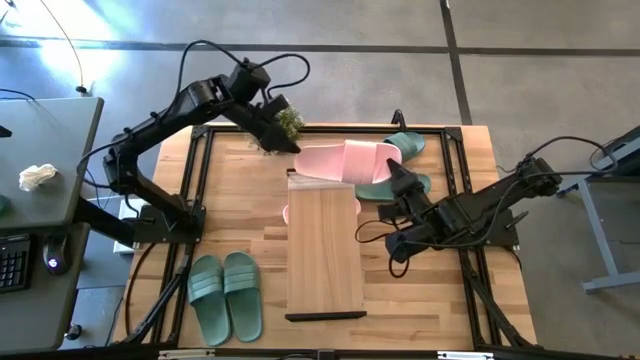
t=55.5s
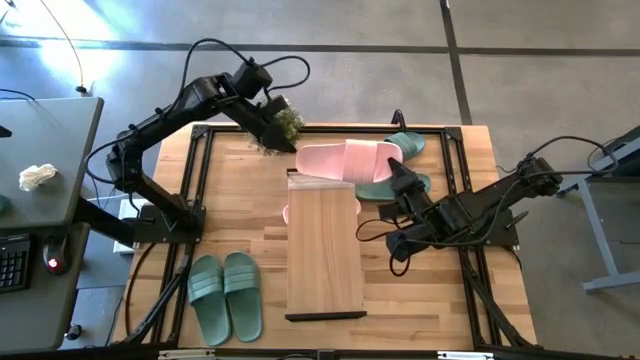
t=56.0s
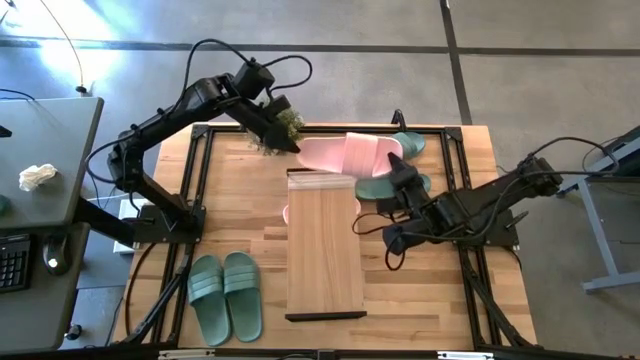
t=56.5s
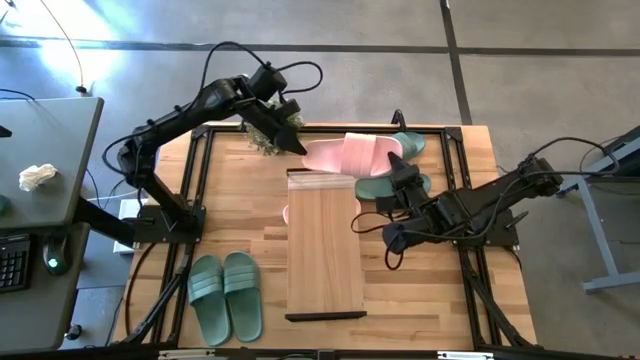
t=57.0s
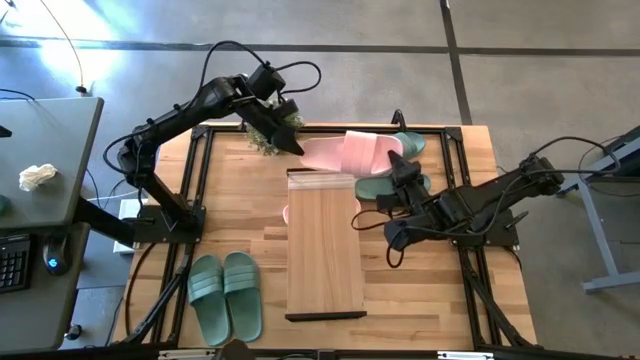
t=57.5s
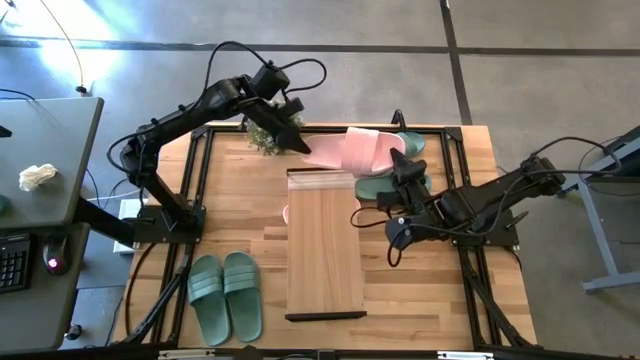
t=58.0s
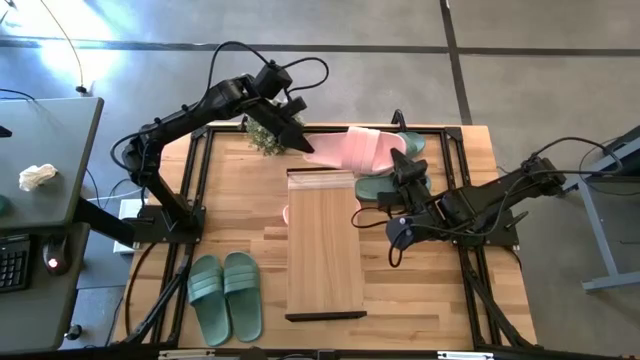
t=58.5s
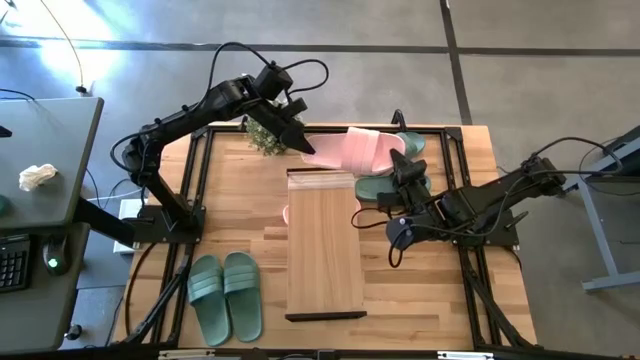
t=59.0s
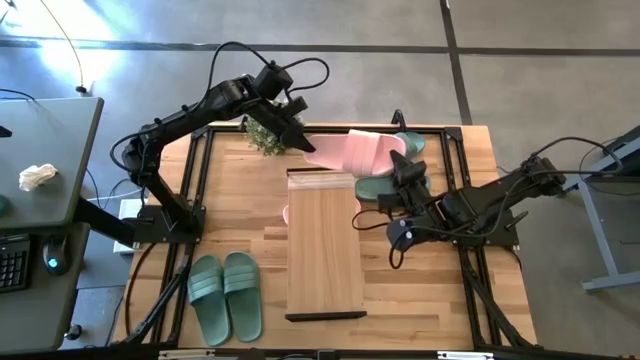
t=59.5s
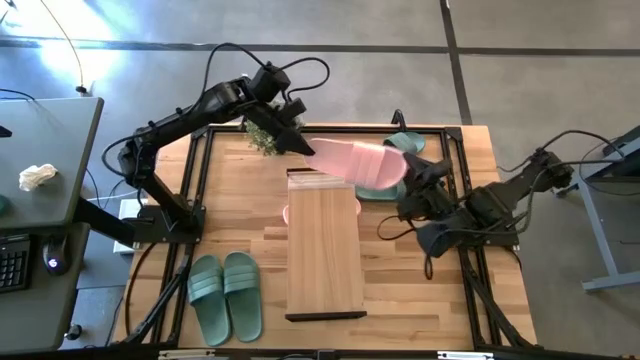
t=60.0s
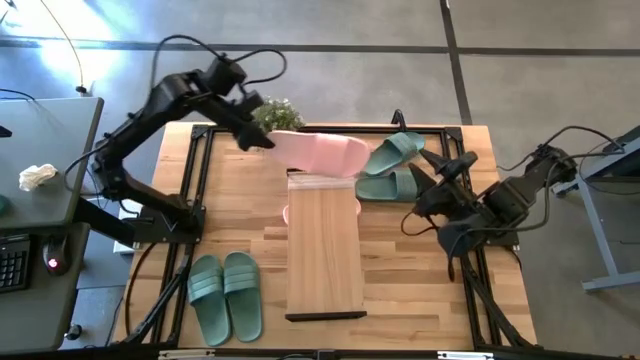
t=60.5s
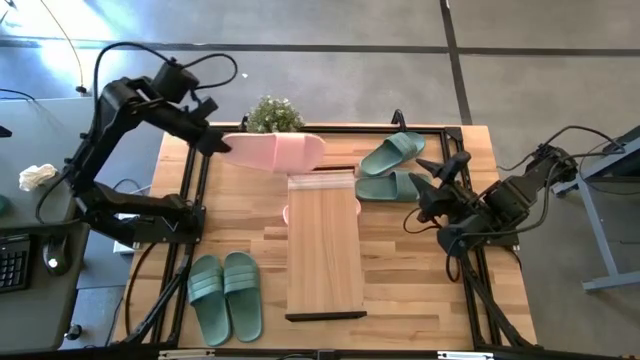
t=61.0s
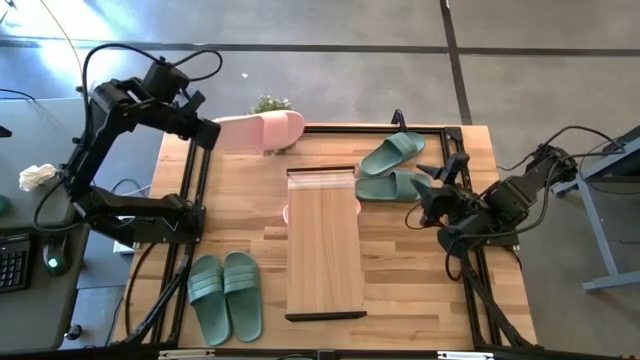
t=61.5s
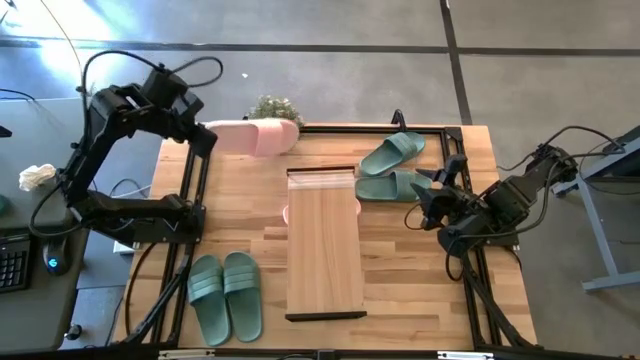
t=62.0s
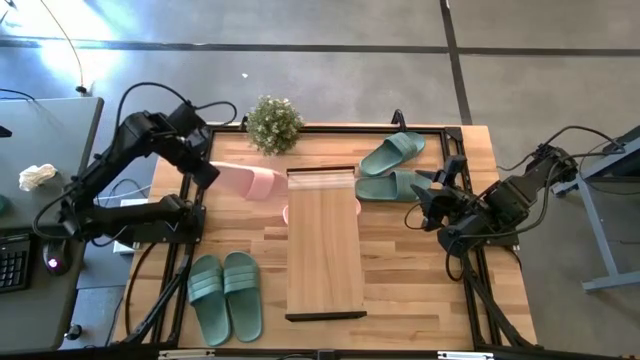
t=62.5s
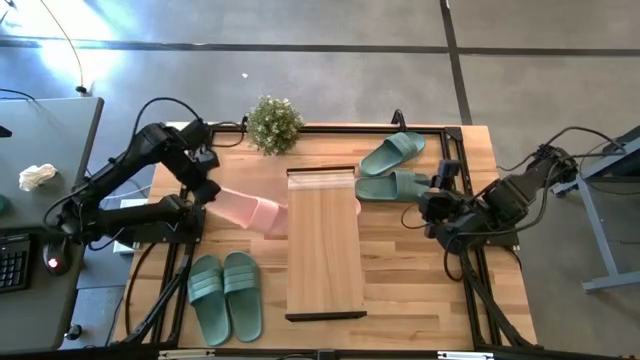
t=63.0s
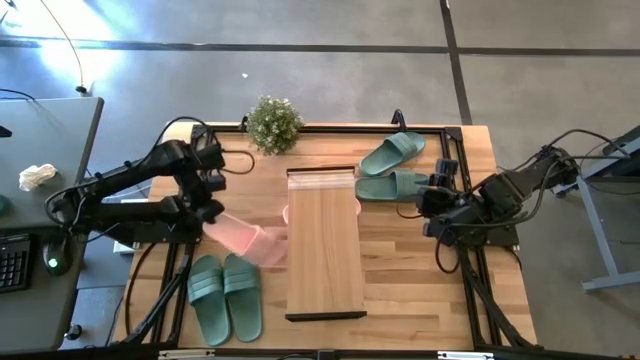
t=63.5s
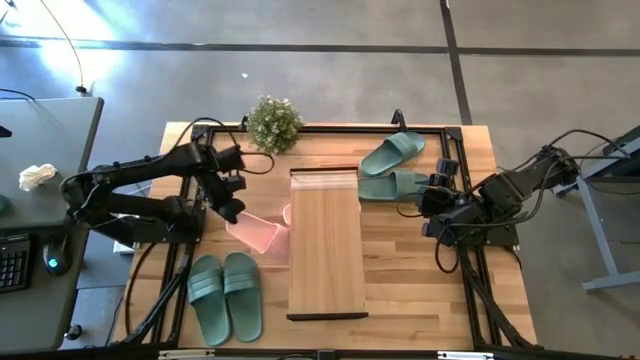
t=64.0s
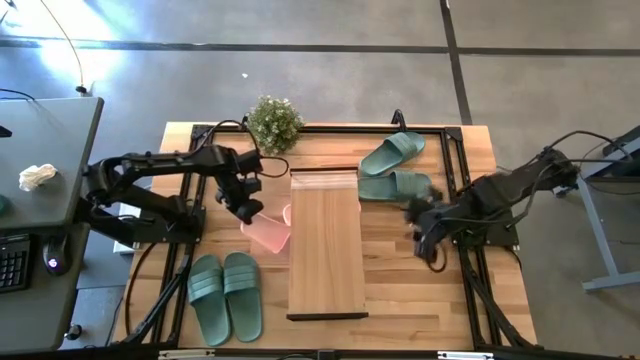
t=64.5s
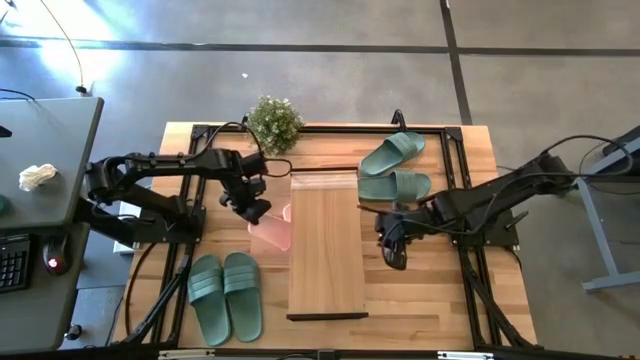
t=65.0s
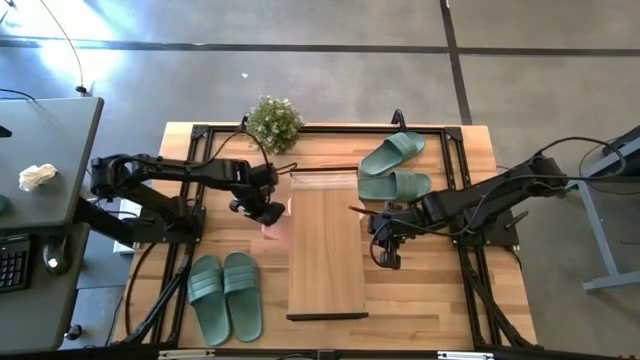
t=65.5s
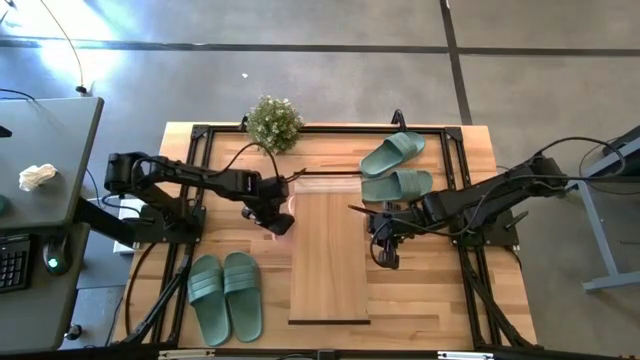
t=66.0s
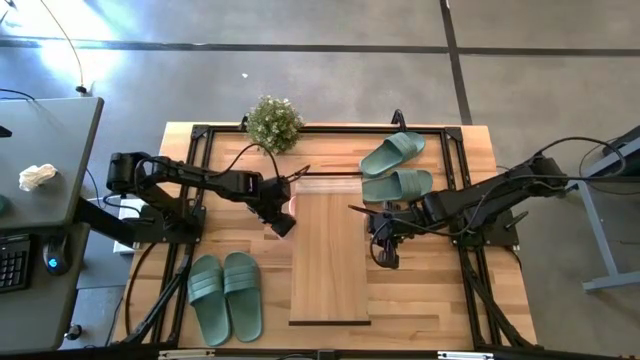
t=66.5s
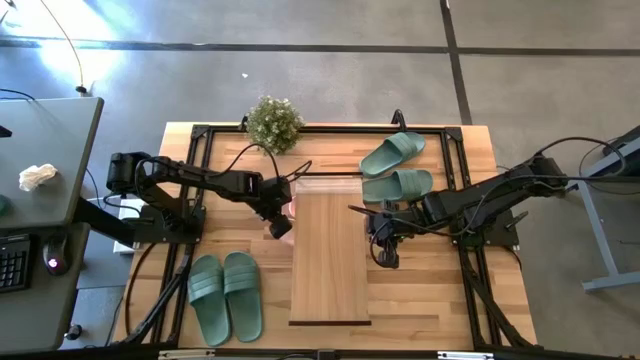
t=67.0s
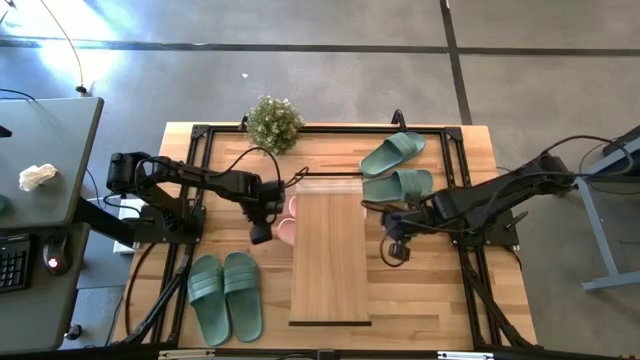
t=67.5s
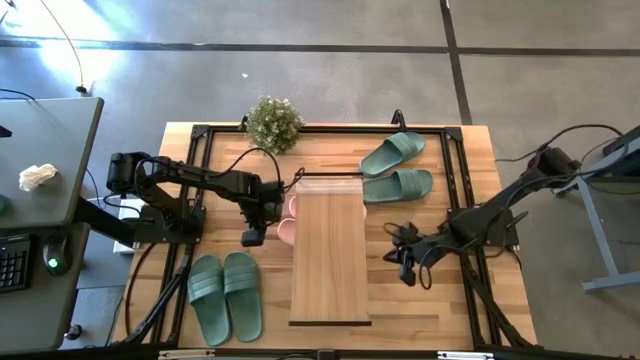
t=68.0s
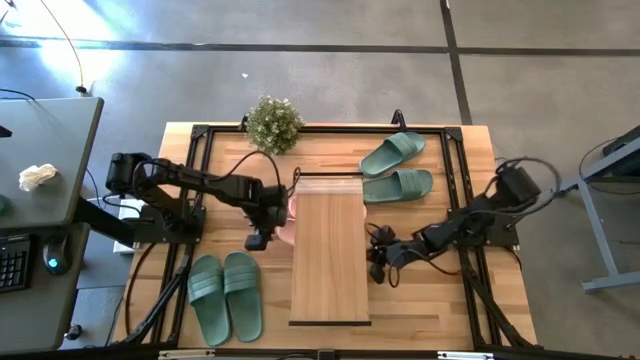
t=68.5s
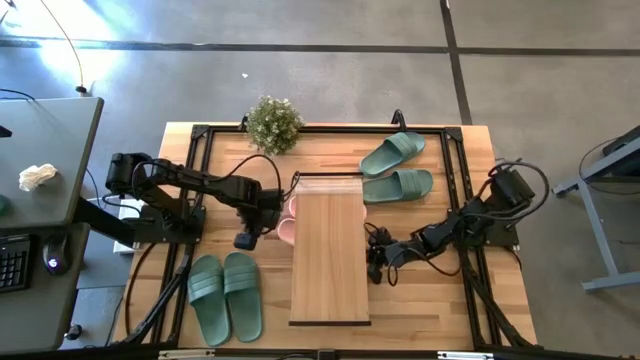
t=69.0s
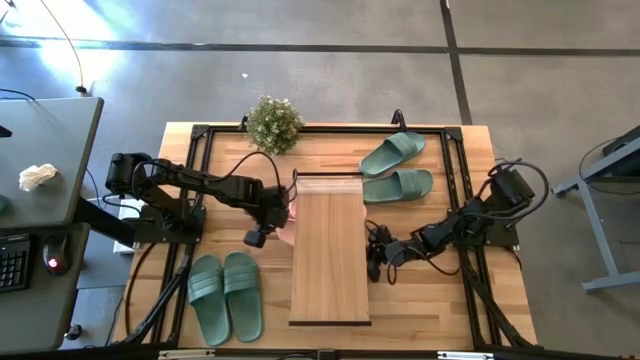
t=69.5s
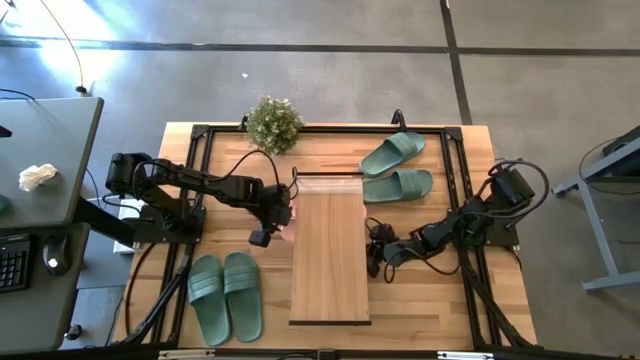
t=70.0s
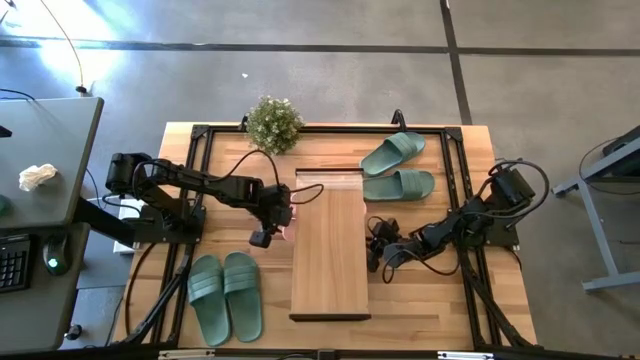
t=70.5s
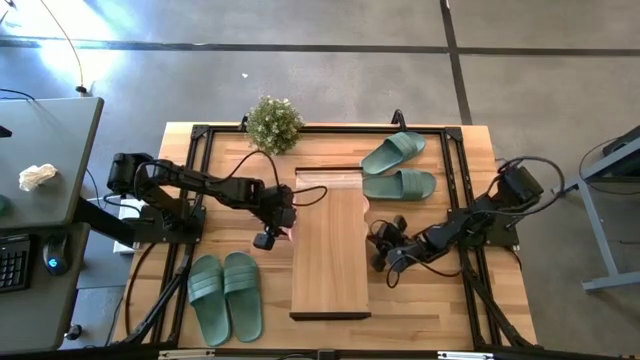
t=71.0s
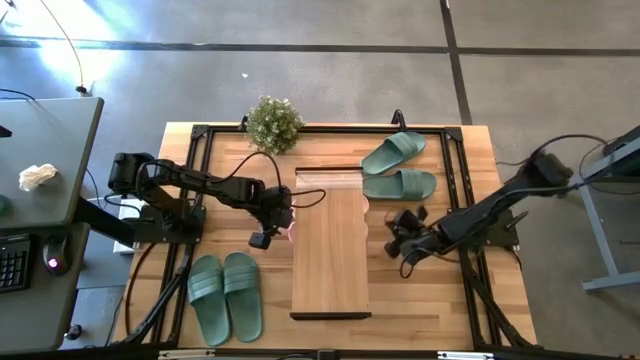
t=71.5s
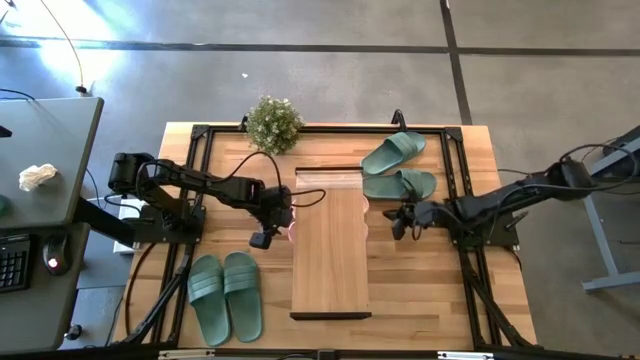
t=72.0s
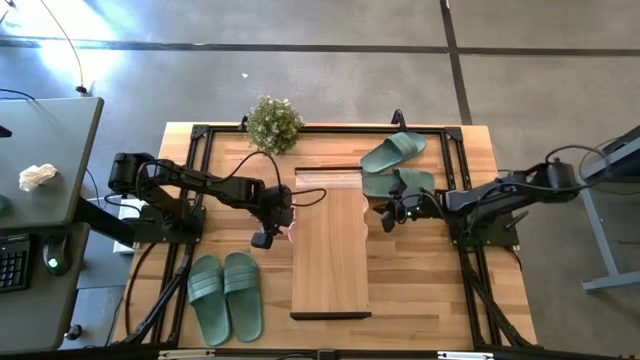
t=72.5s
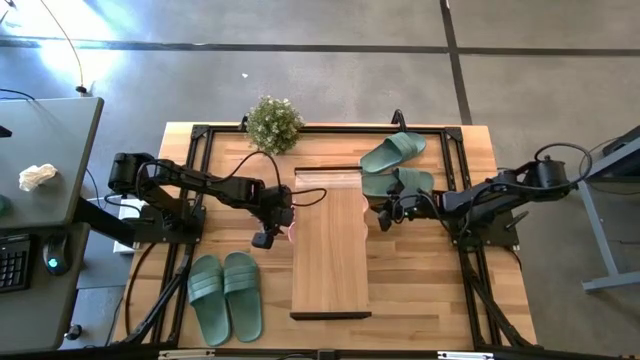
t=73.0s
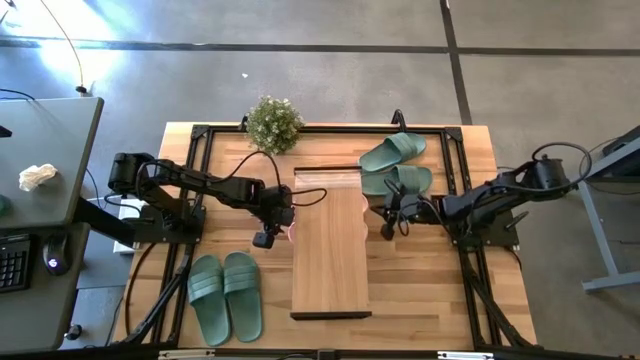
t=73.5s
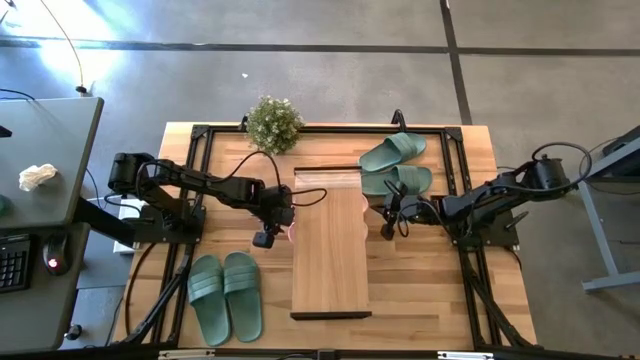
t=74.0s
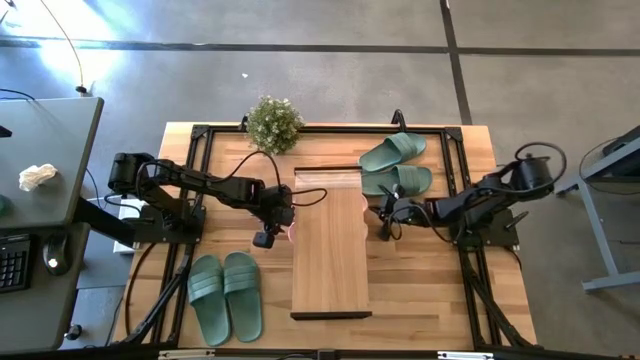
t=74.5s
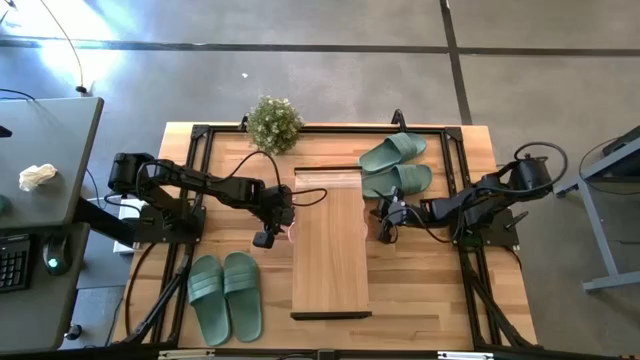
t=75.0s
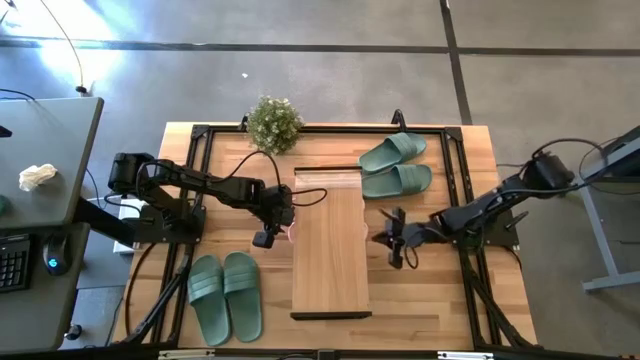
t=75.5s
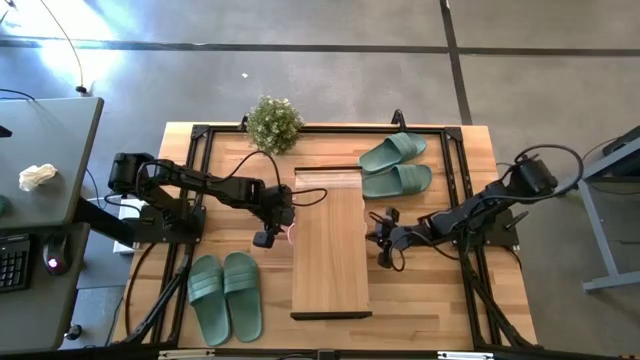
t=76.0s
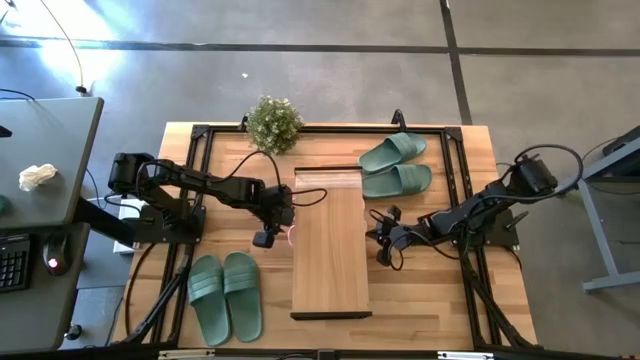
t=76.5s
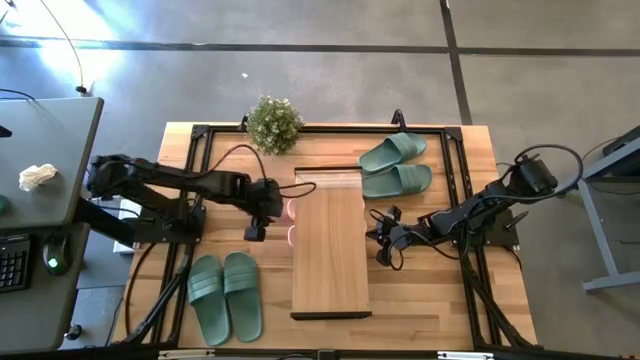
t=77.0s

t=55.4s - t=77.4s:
Task: Pick and place slides into the shelf
Put the pink slide under the shelf aligned with the other pink slide
